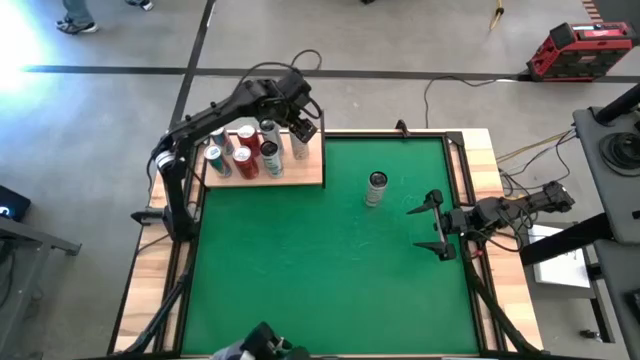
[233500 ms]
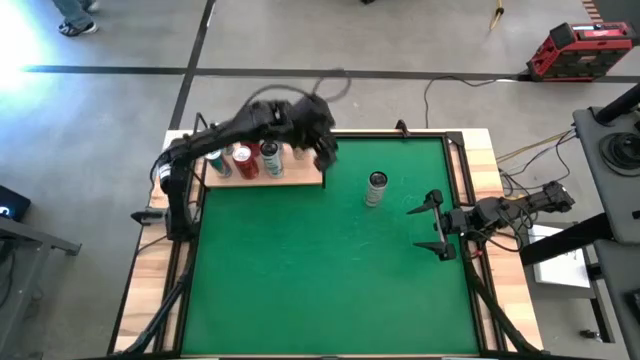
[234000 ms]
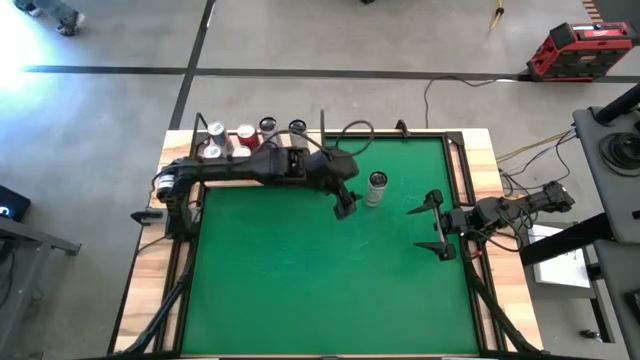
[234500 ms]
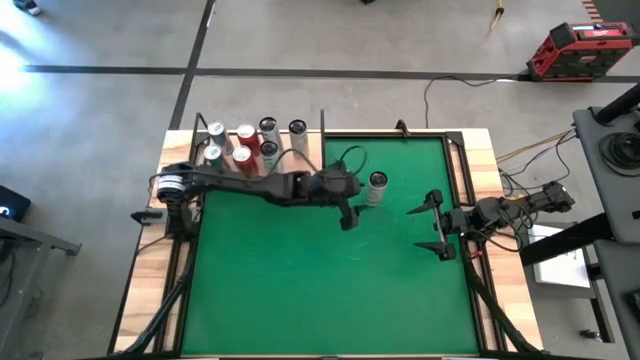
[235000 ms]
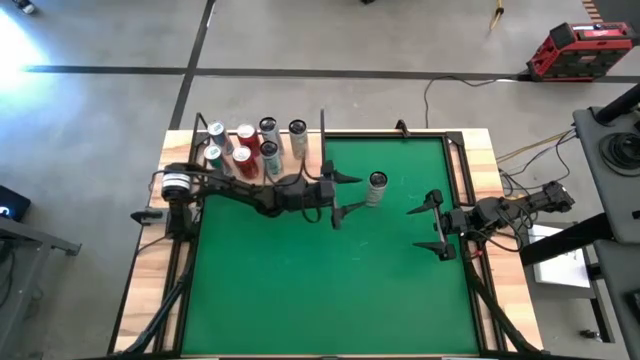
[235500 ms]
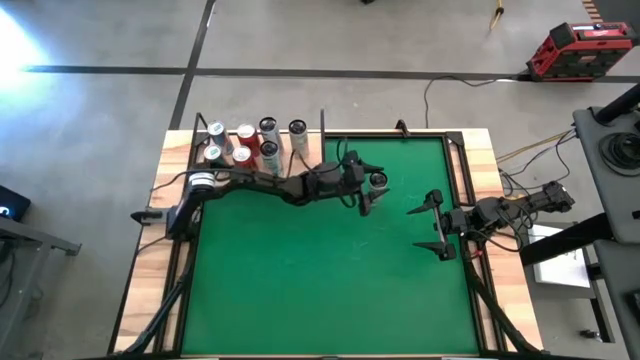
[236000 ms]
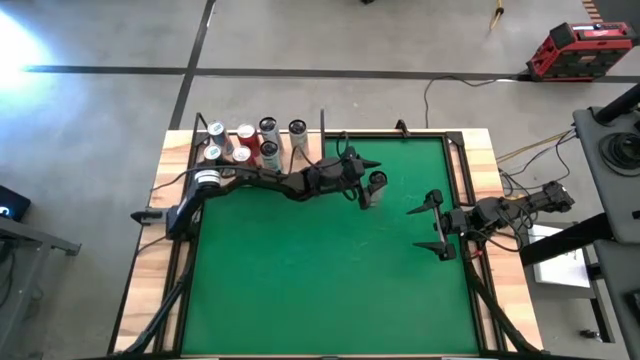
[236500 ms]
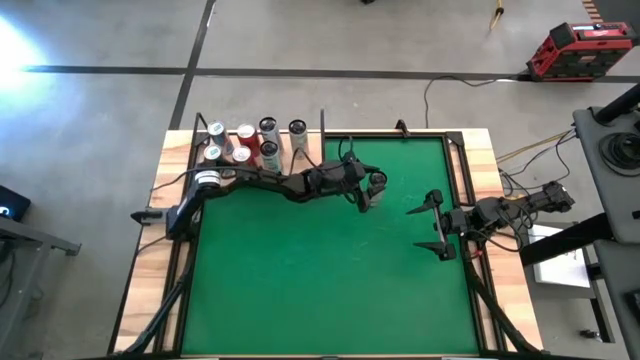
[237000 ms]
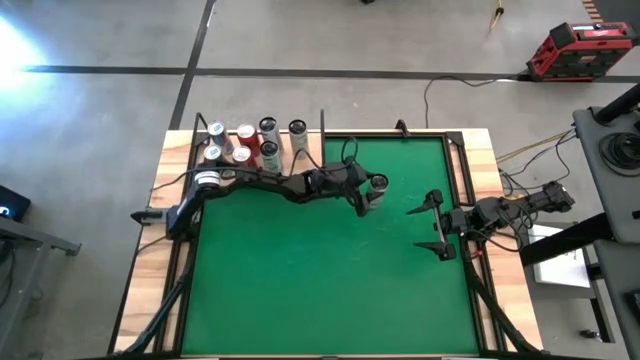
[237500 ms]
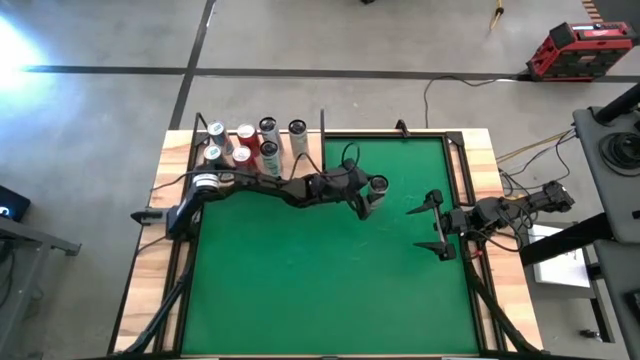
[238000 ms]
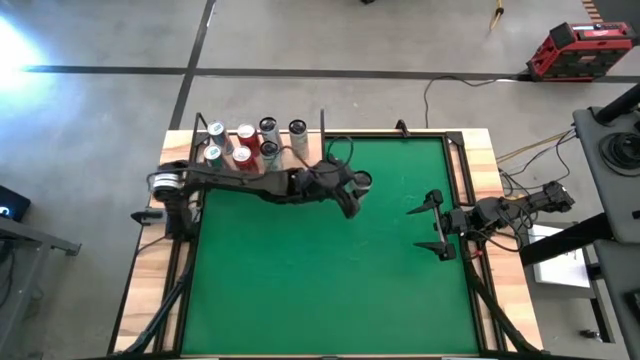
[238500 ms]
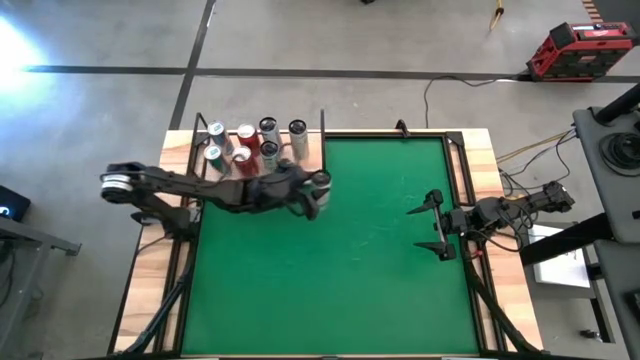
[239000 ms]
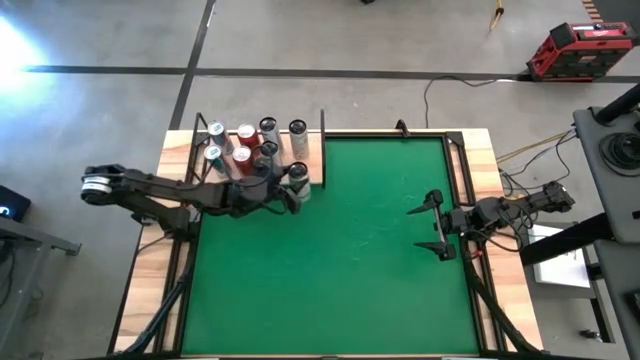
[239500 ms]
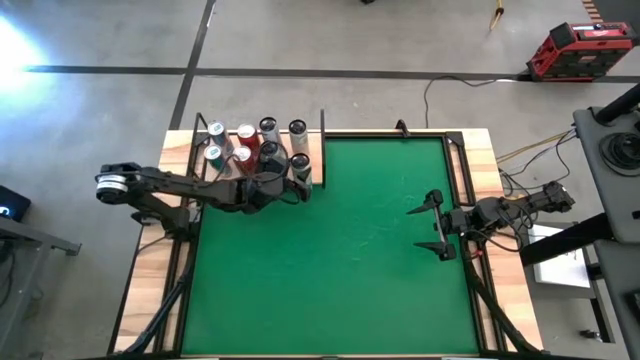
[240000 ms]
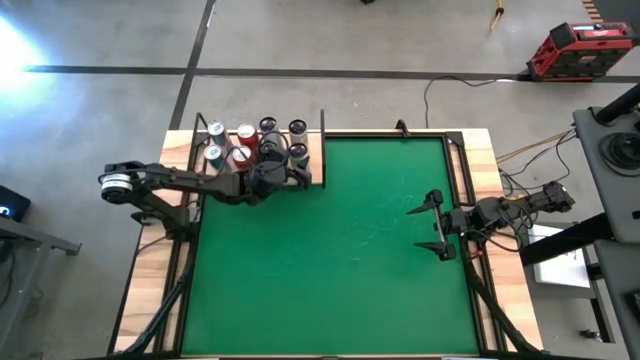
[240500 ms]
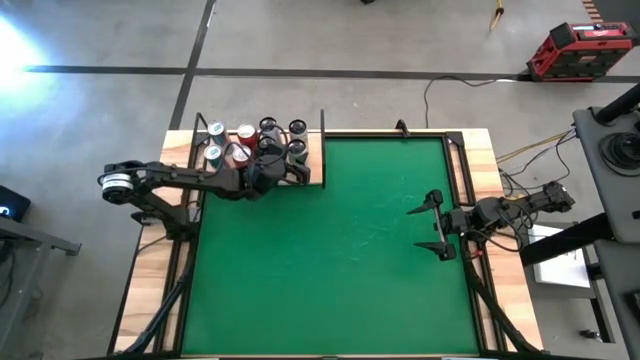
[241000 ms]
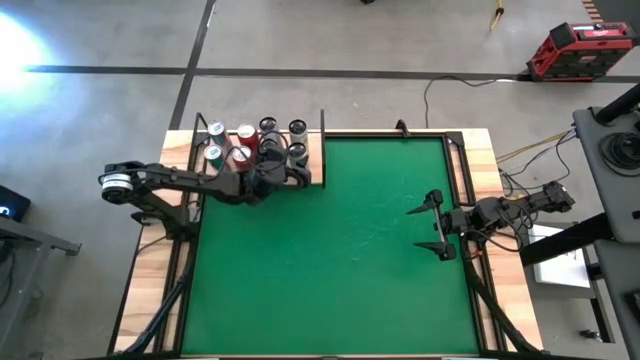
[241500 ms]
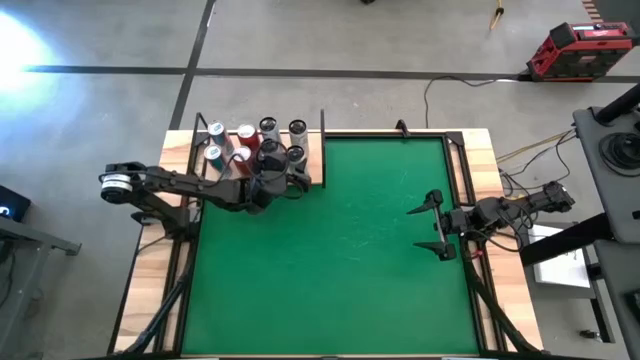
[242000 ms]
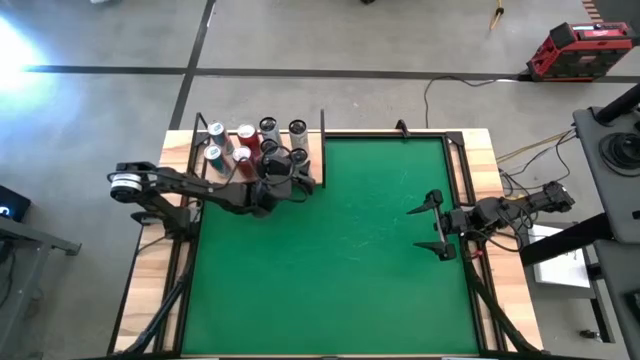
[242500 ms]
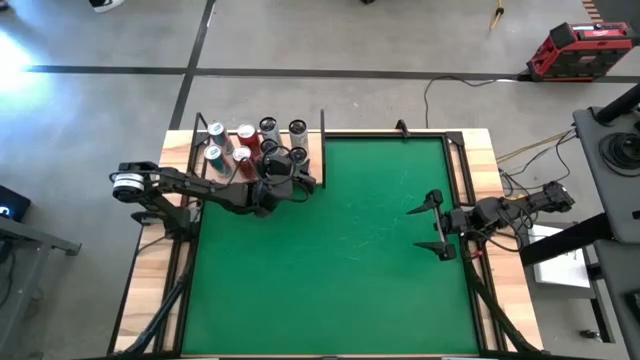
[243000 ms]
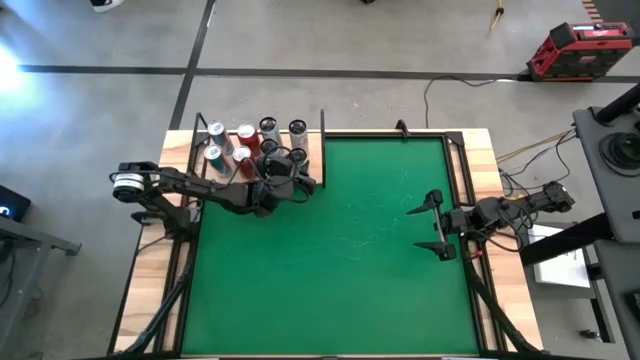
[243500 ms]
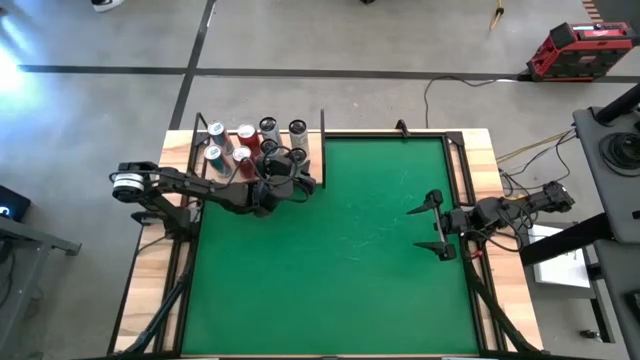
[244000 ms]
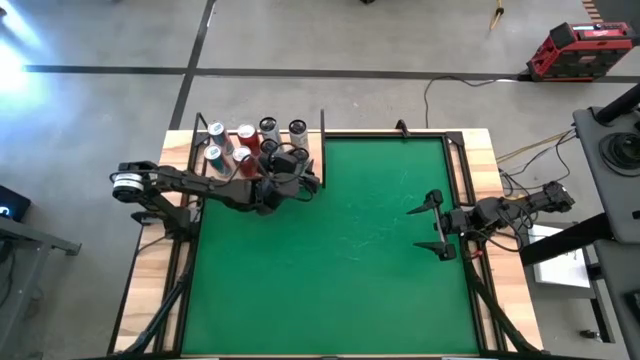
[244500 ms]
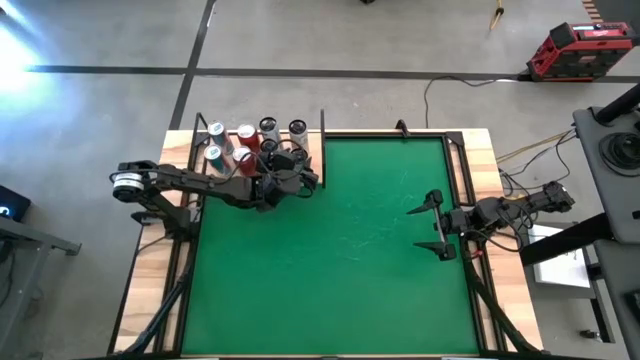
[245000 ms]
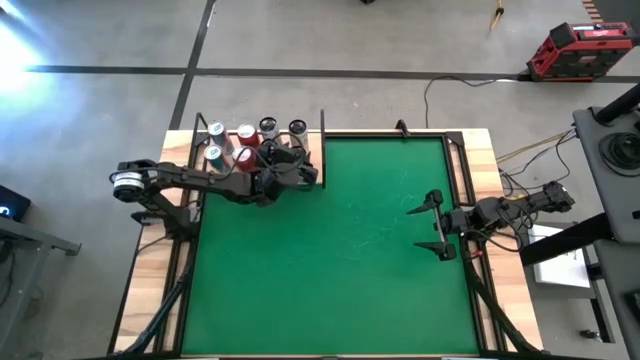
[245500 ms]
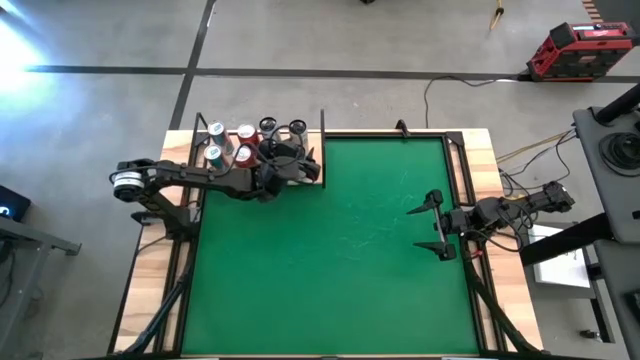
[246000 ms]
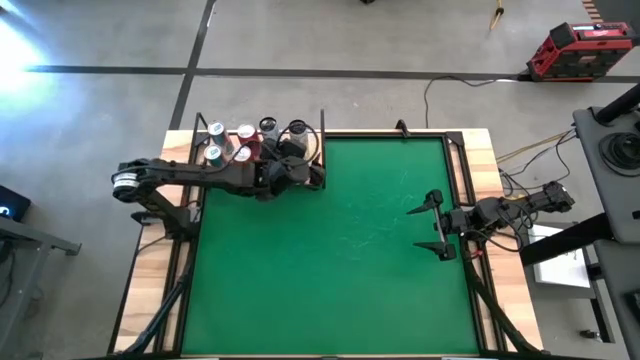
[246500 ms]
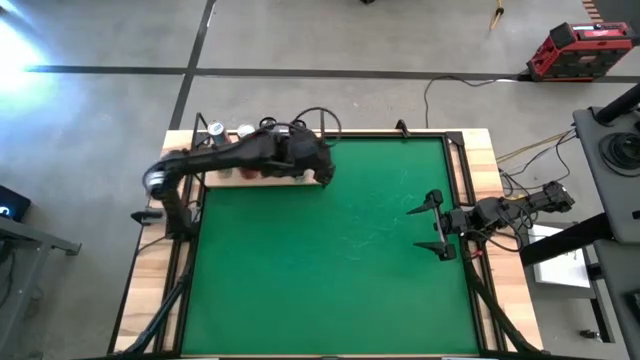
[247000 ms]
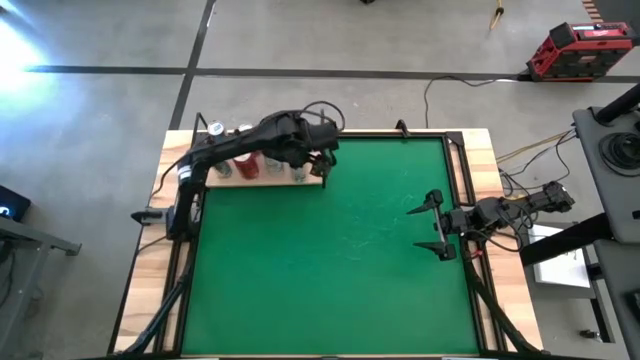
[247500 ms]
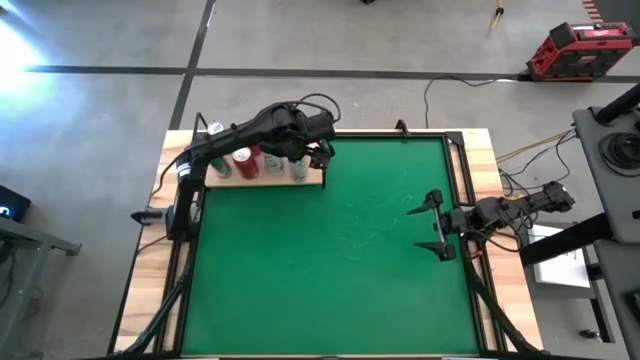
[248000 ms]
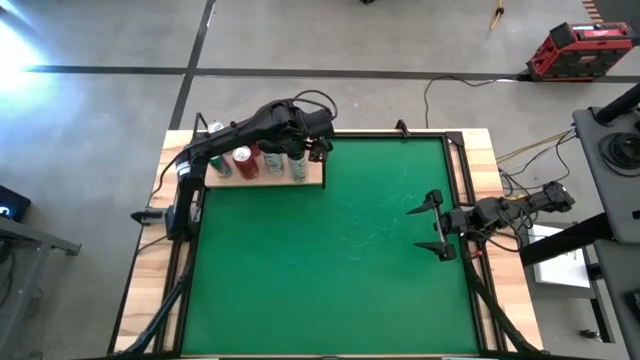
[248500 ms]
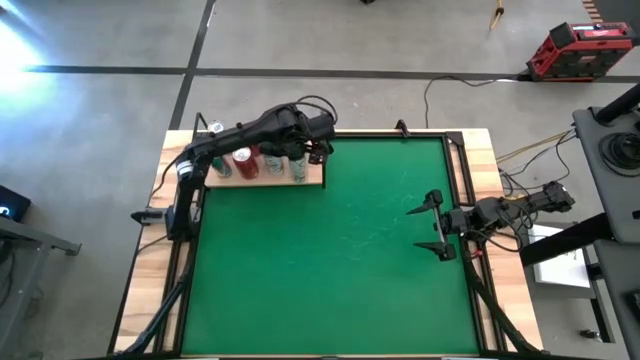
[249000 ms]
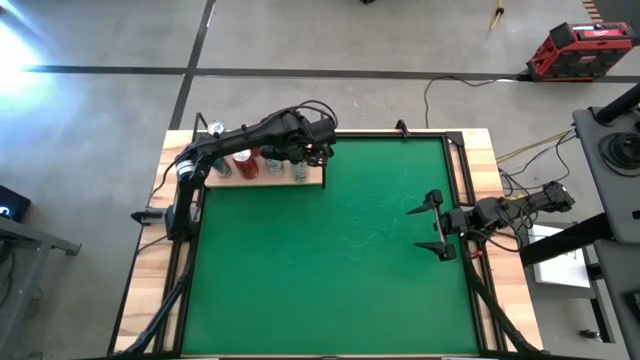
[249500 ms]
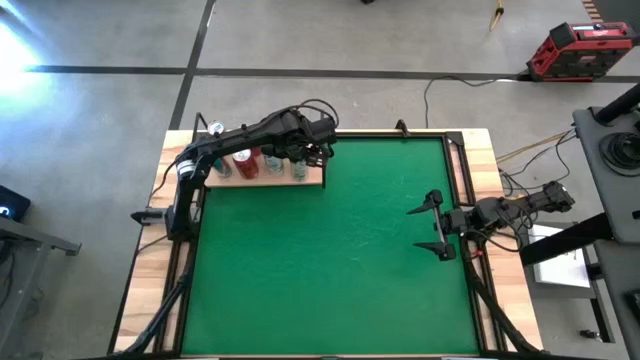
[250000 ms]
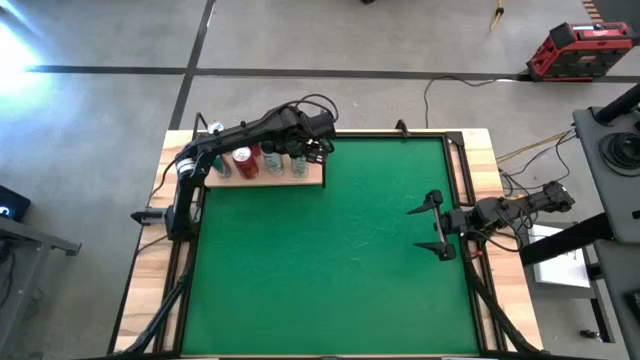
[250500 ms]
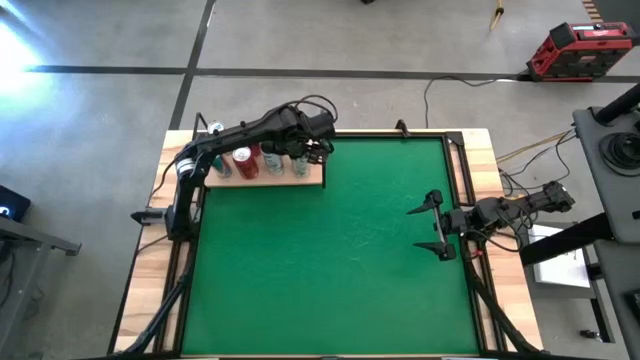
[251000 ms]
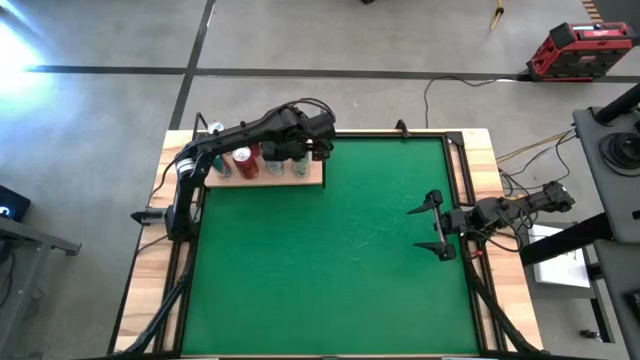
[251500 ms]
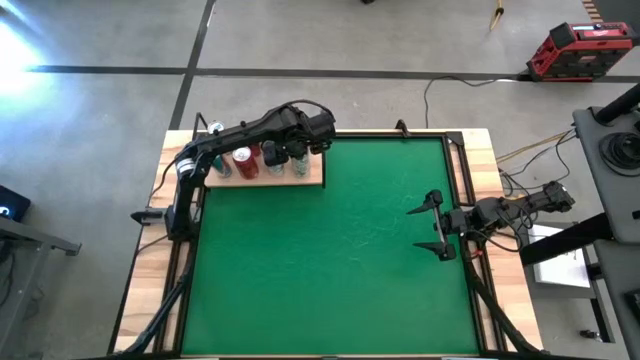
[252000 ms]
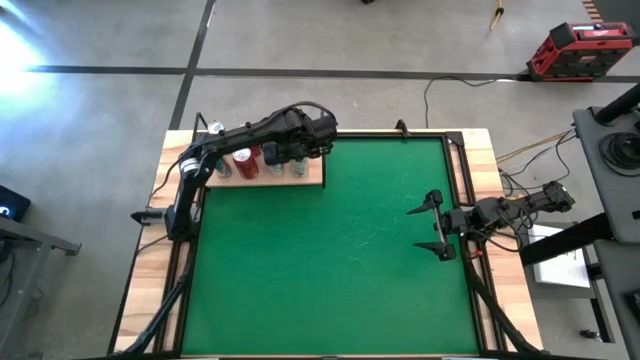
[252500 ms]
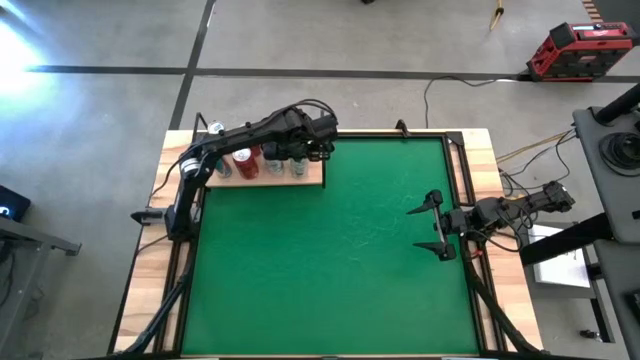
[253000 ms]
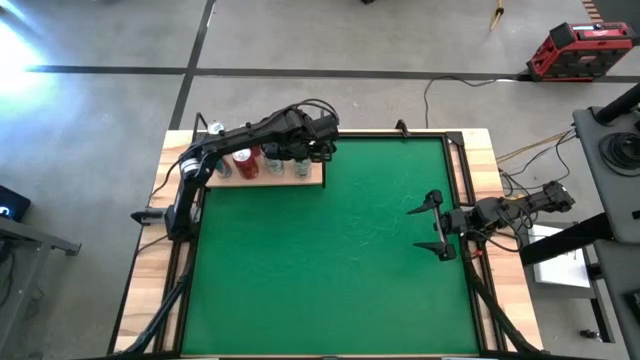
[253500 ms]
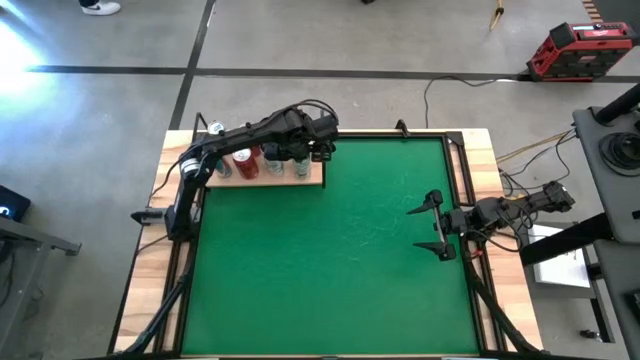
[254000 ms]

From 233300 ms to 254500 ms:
Task: Place canned beverage on shelf
Put the white yellow soda can on the shelf aligned with the other white yellow soda can
